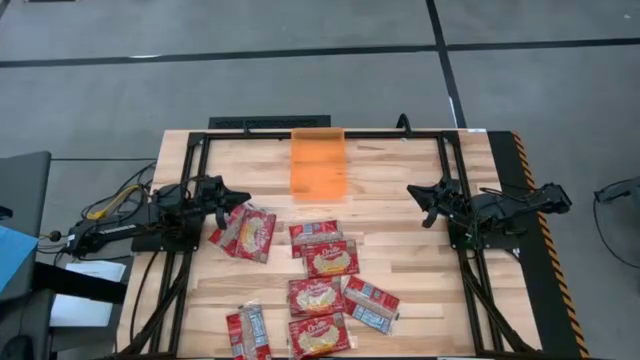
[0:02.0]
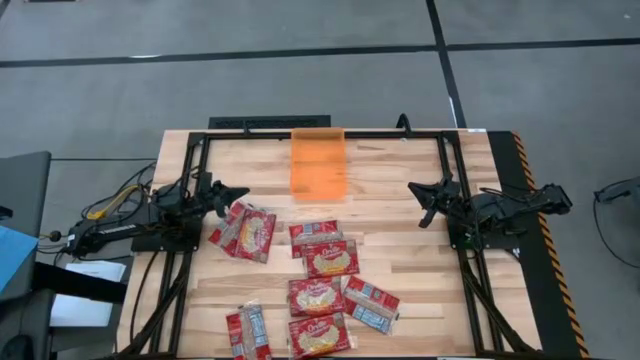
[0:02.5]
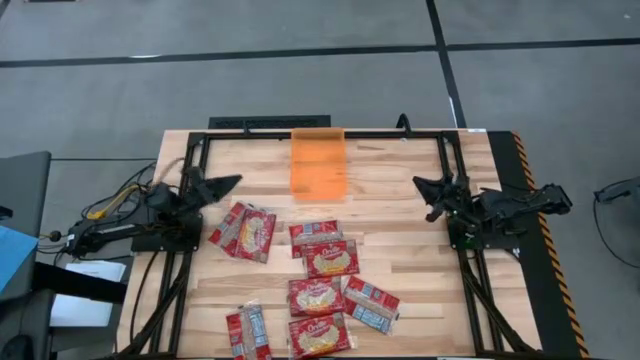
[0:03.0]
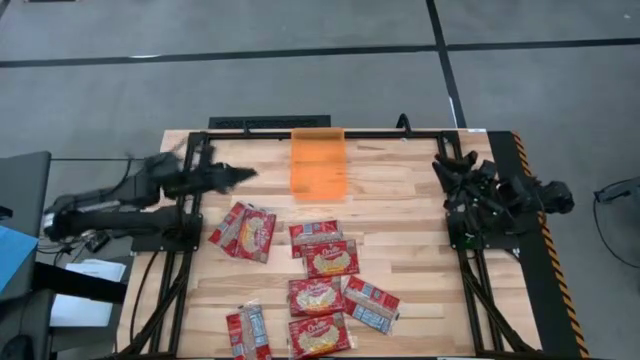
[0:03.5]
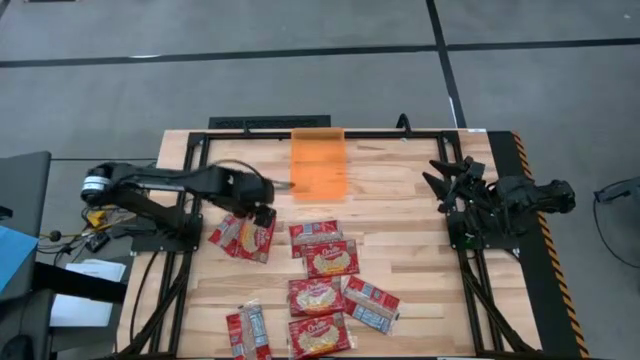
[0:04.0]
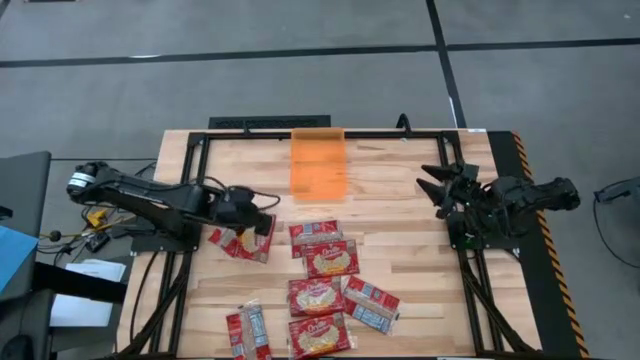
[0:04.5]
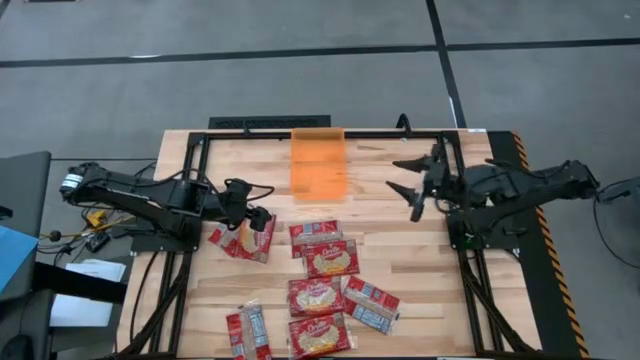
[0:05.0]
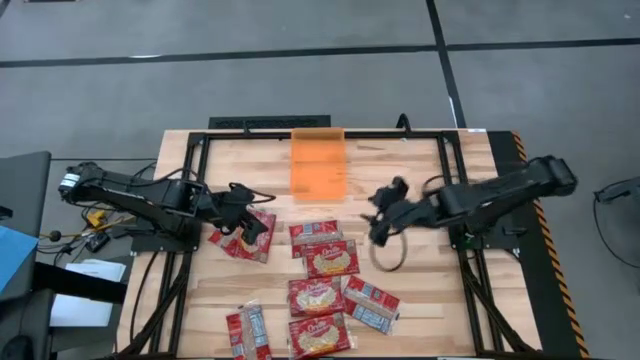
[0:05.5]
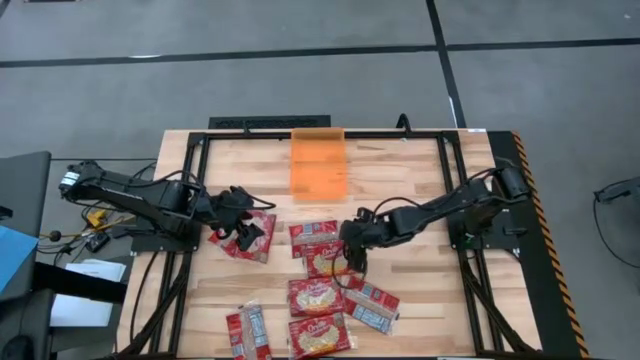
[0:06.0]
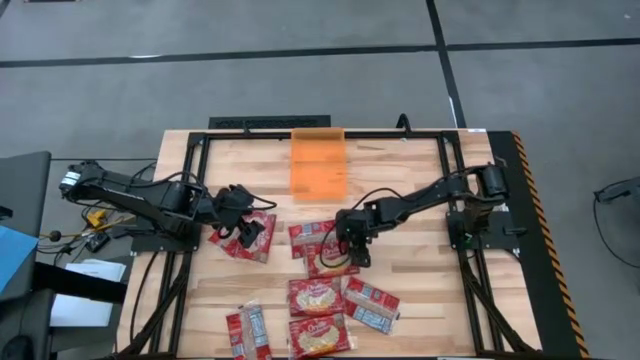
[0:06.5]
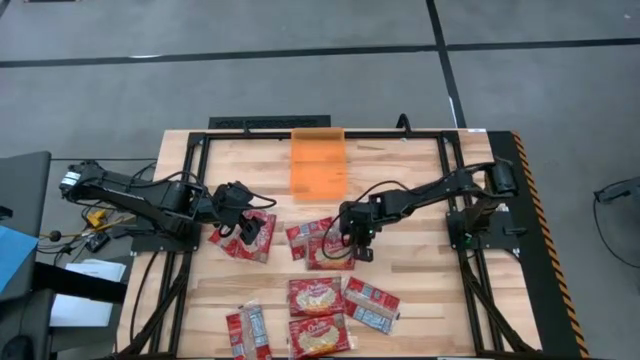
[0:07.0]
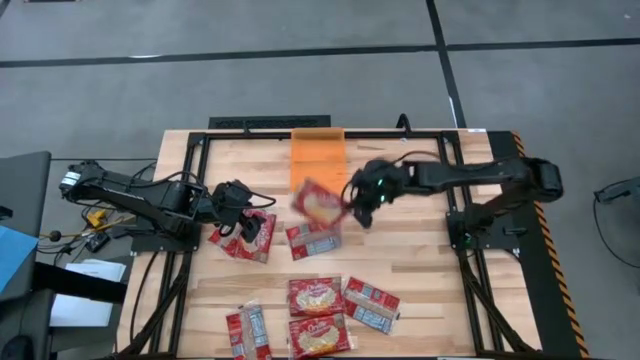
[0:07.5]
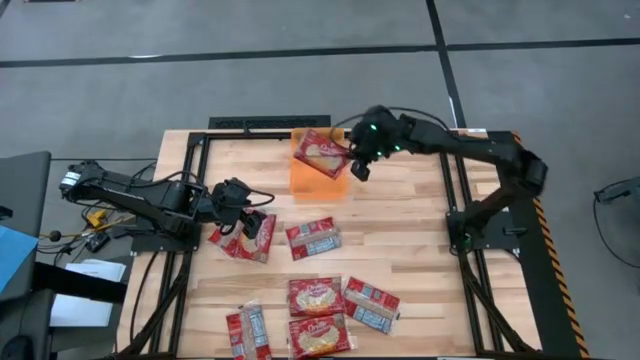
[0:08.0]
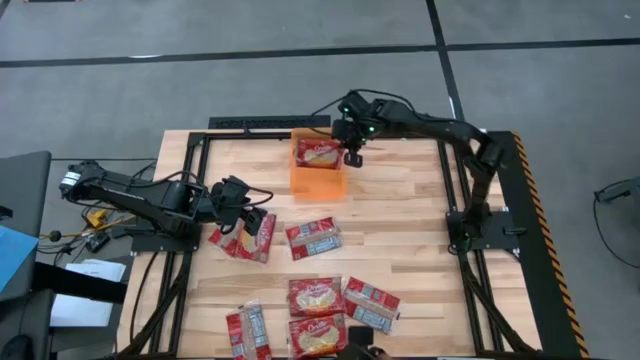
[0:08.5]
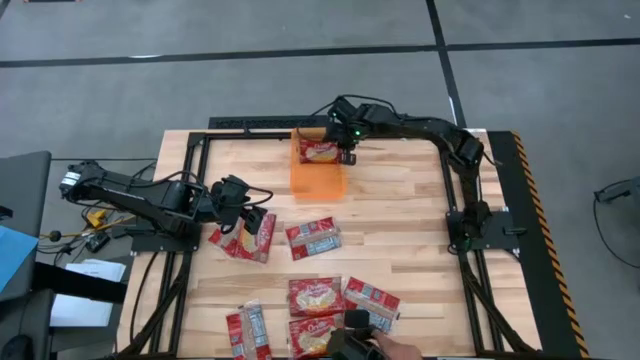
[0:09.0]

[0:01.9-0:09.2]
Task: Sort popcorn bags into baskets
Put the red popcorn bag into the orange bin

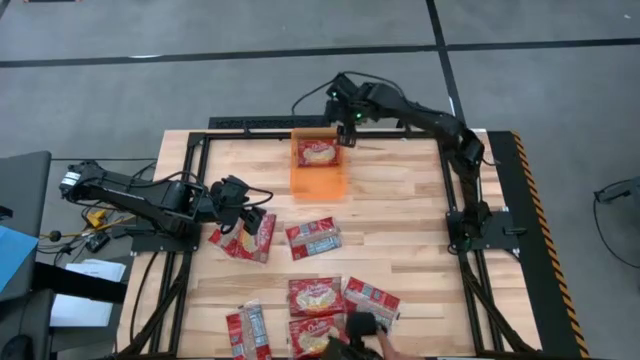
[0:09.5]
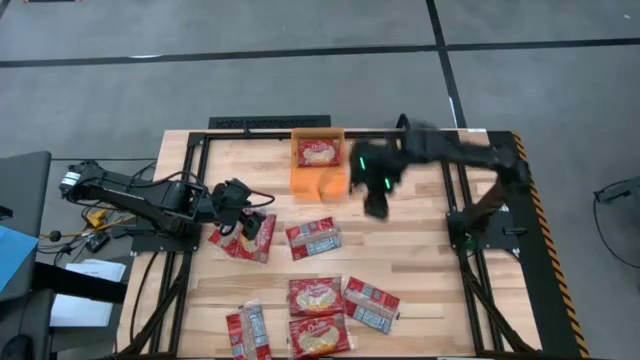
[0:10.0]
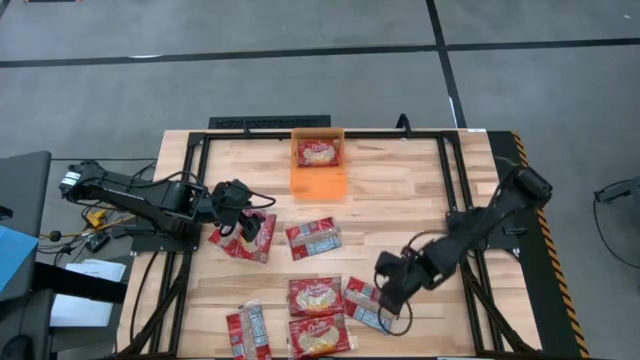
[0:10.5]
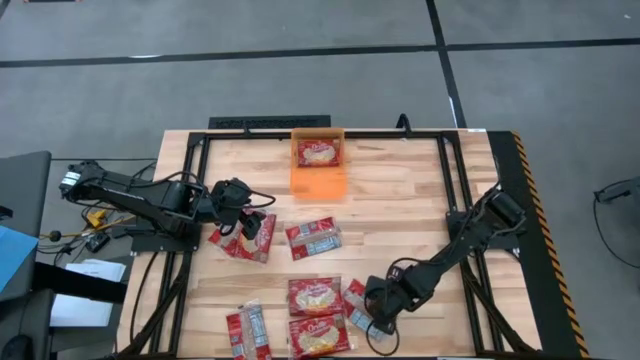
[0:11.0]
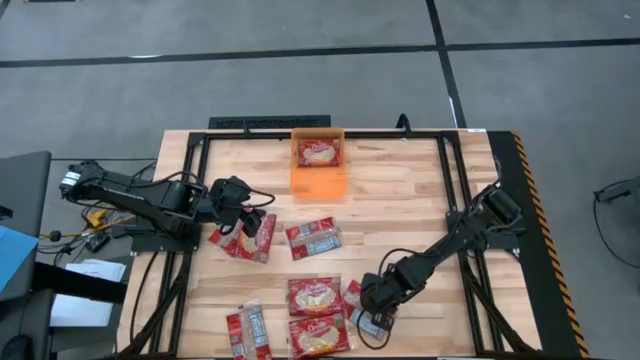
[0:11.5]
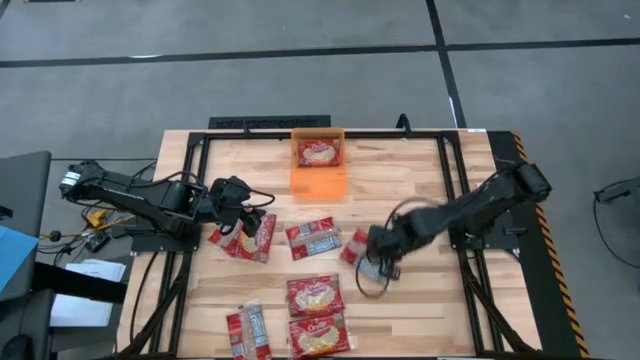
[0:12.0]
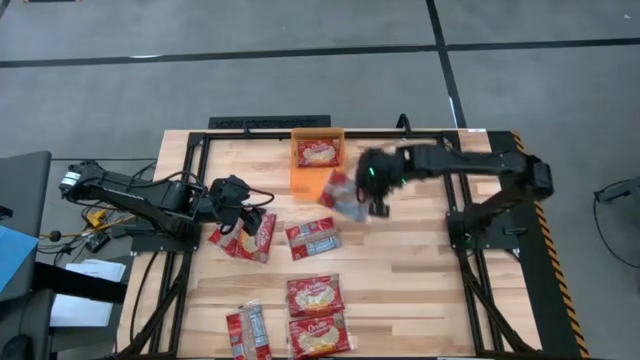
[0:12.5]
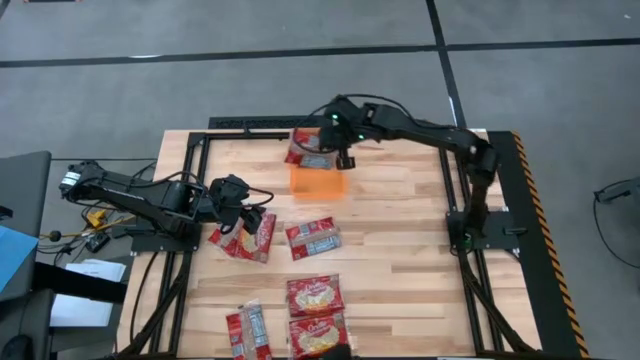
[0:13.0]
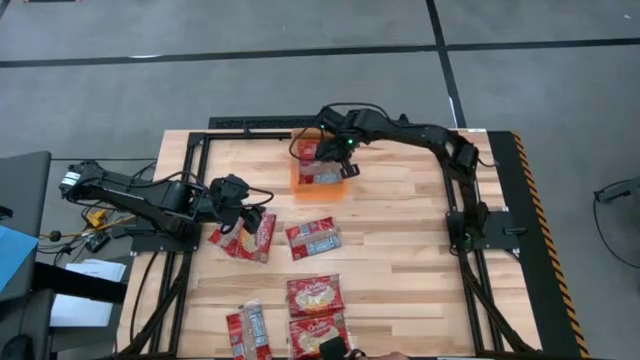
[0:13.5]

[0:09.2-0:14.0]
Put the red popcorn bag into the orange bin

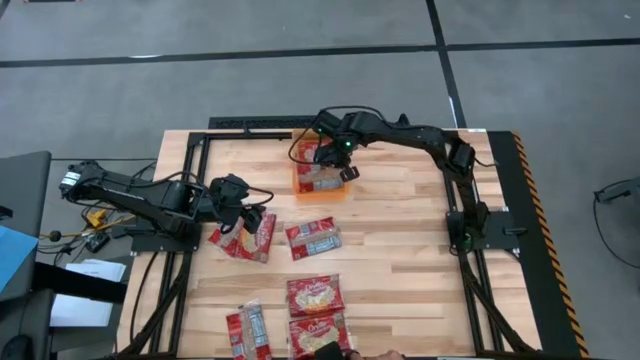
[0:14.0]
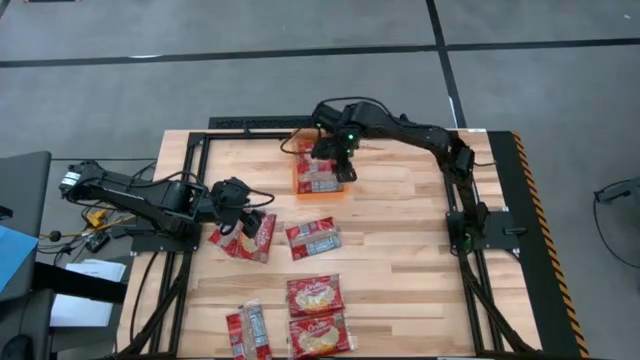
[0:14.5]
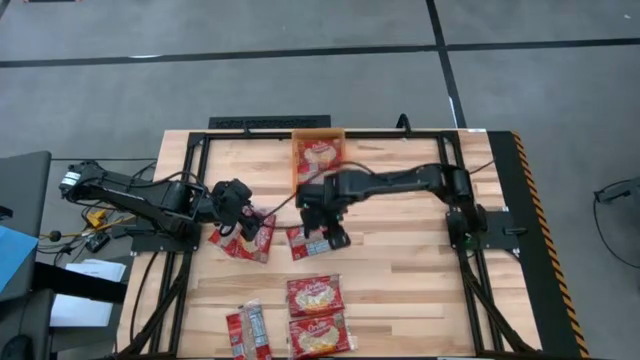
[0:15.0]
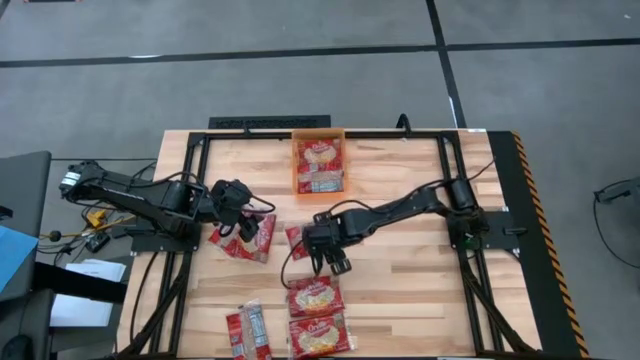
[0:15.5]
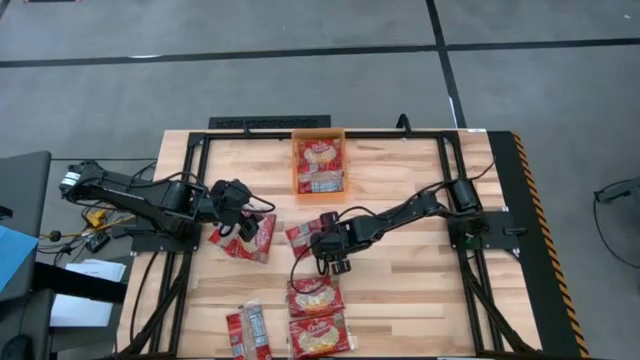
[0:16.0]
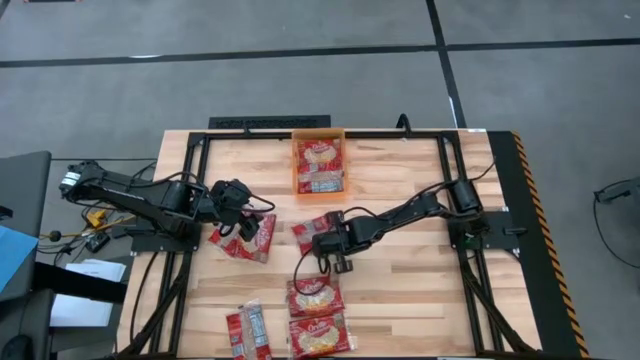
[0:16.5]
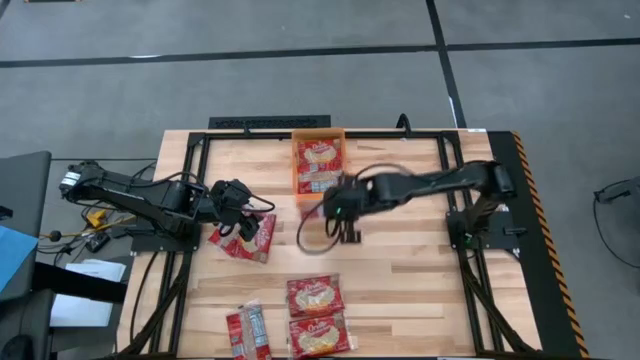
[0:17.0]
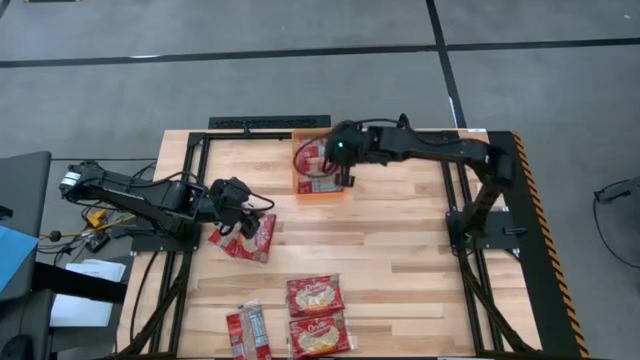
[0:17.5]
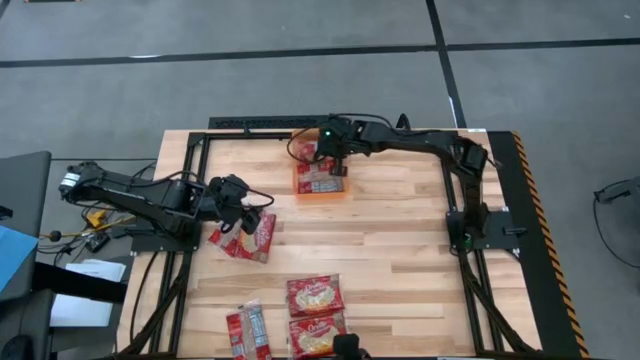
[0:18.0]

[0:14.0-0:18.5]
Put the red popcorn bag into the orange bin

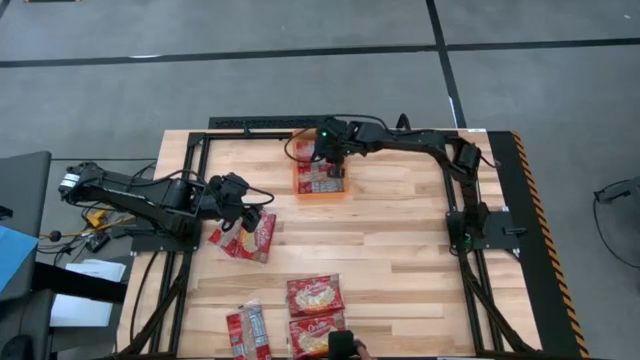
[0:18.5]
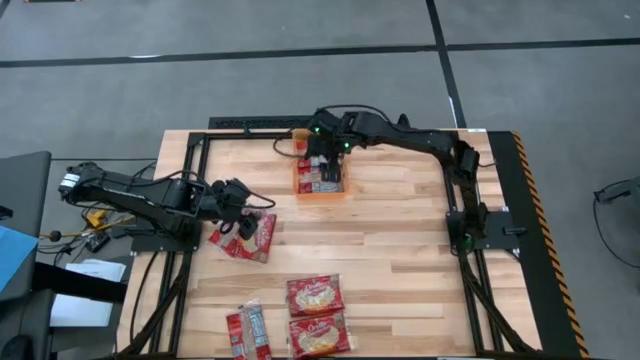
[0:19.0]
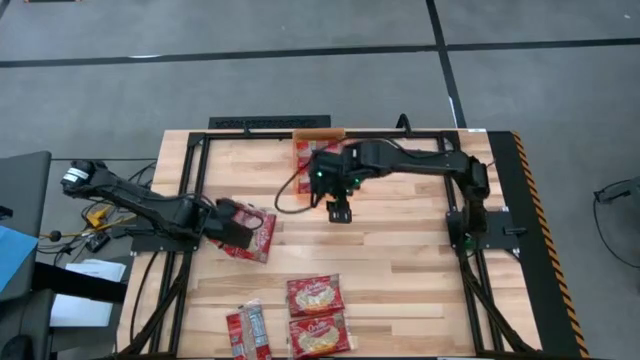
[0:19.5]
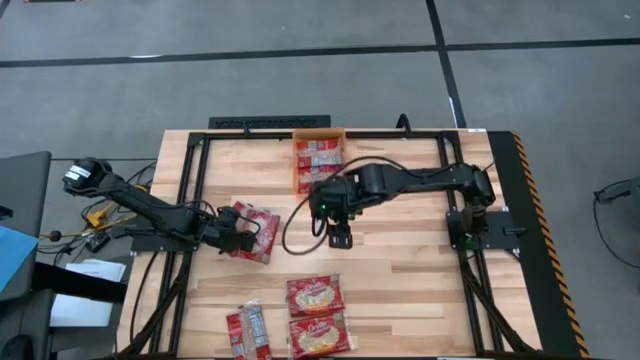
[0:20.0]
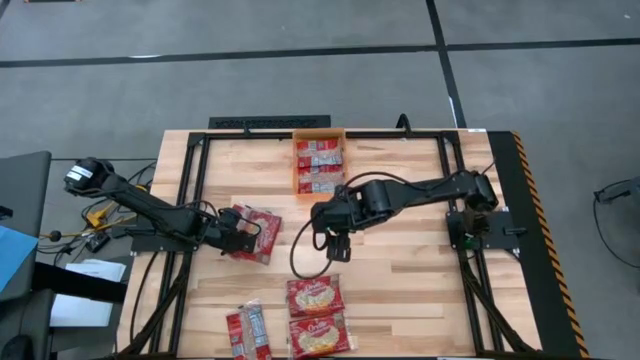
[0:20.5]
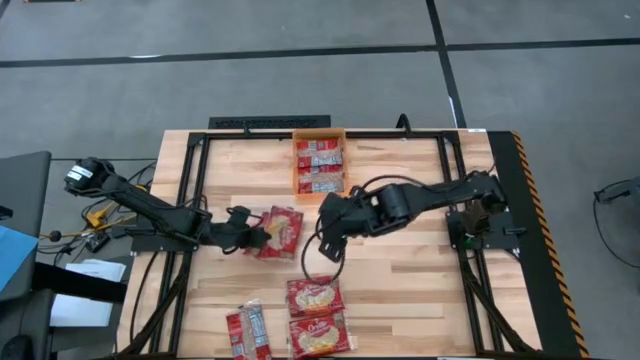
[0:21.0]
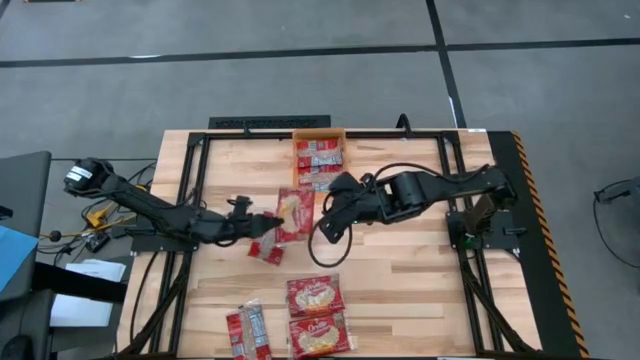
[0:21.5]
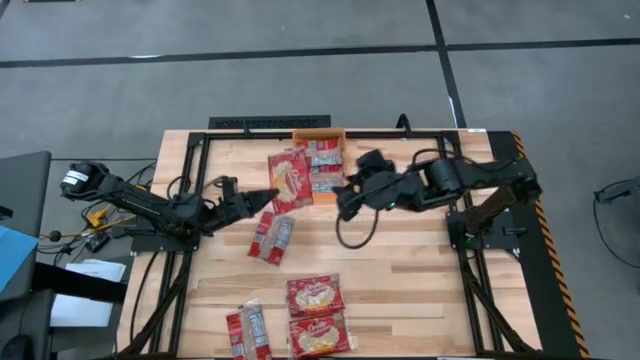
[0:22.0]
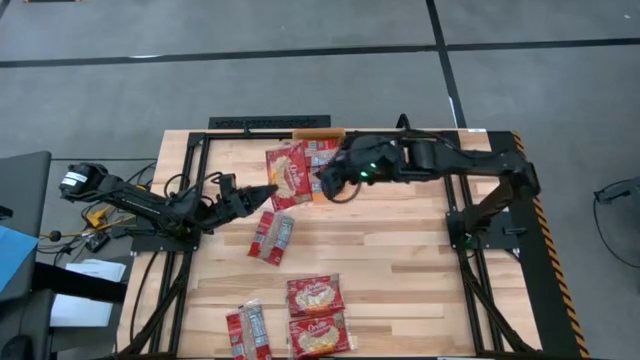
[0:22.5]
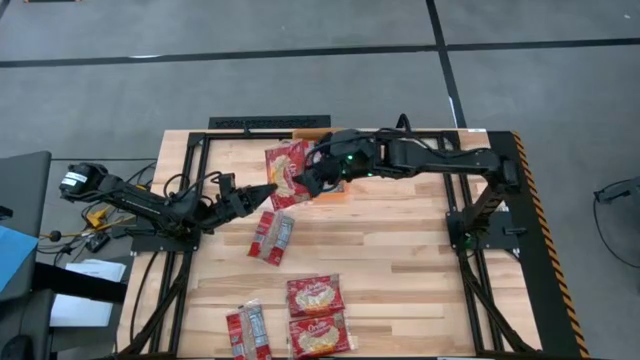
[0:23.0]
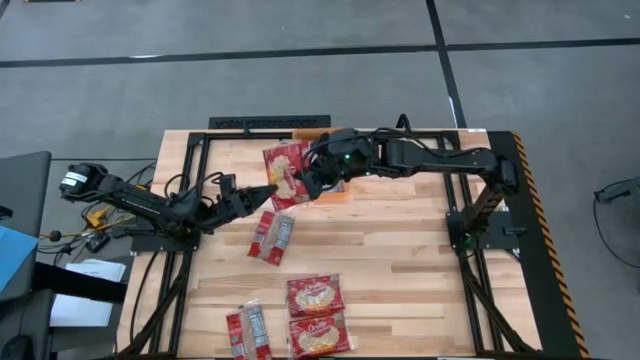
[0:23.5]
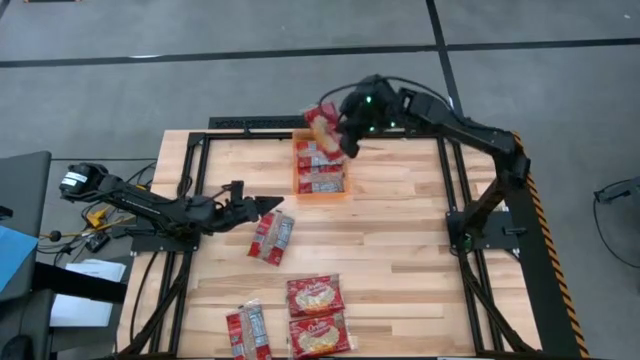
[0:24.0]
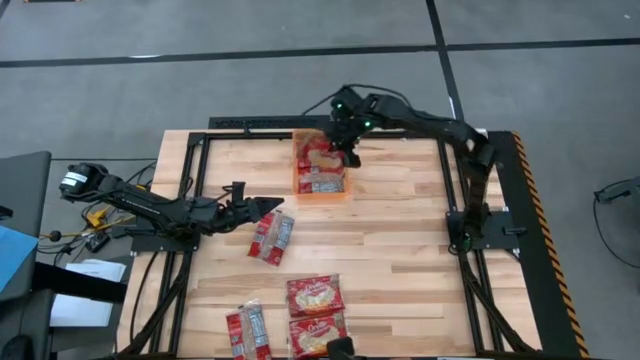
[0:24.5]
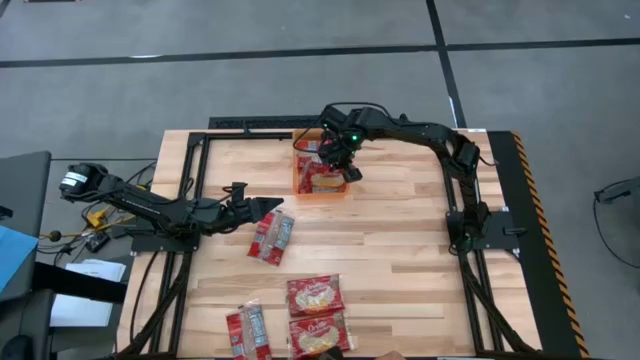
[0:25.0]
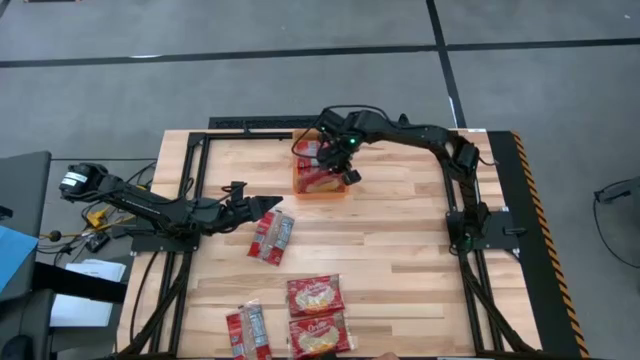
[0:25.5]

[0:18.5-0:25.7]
Put the red popcorn bag into the orange bin
